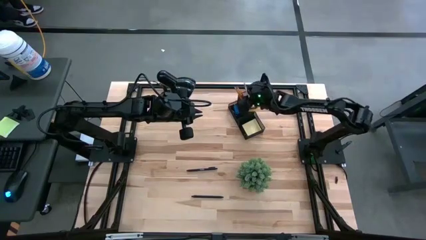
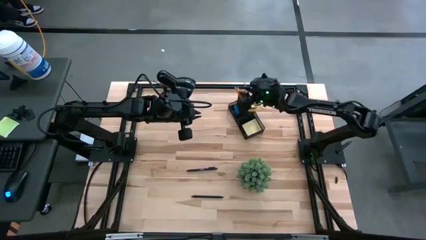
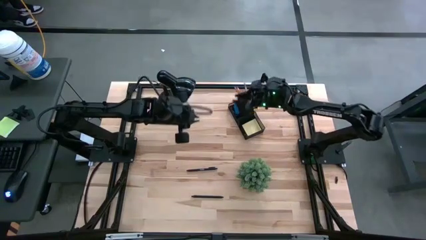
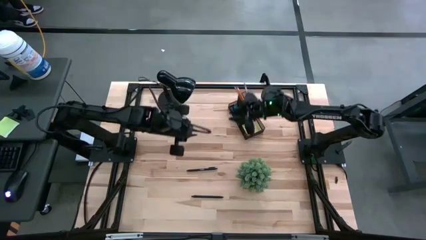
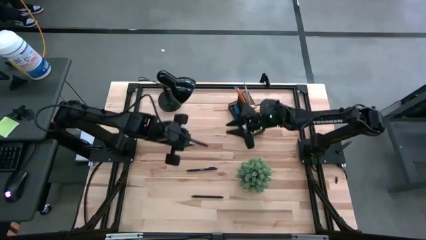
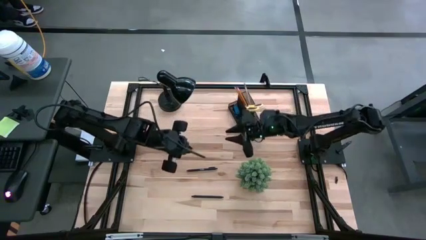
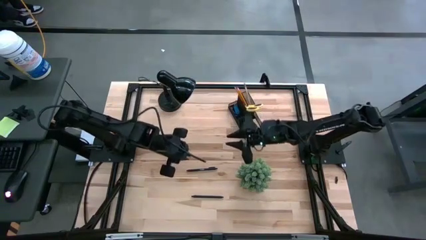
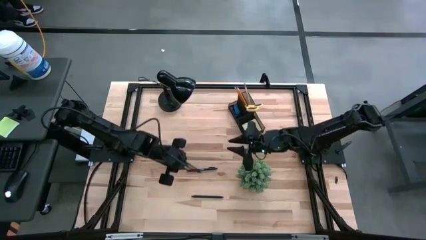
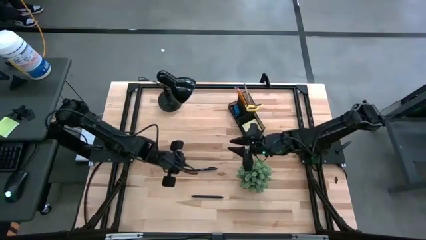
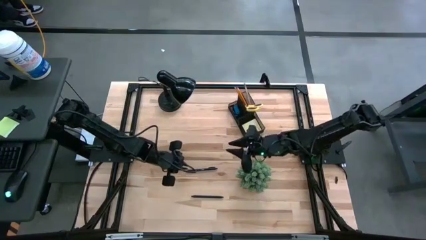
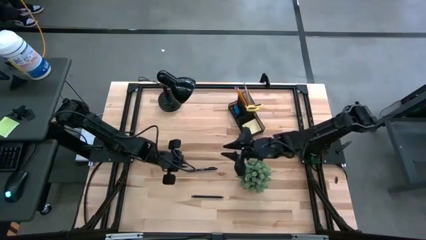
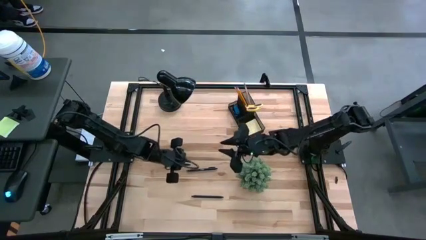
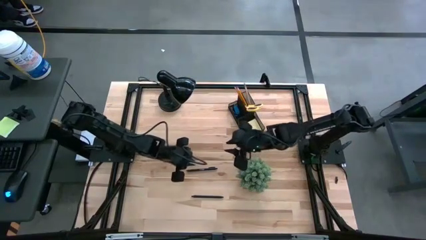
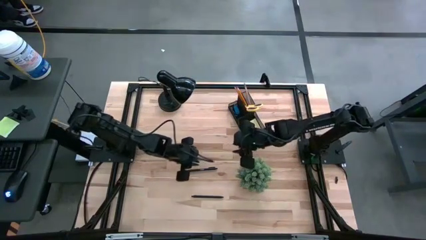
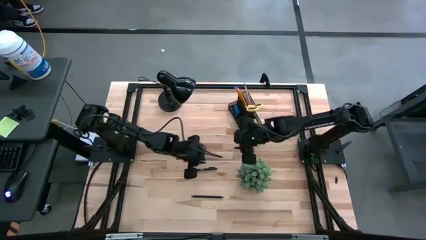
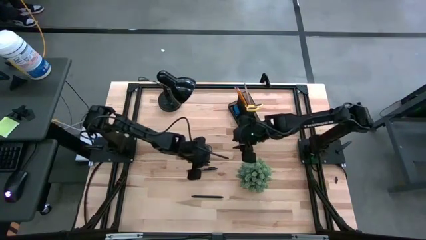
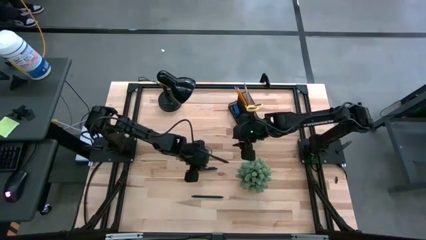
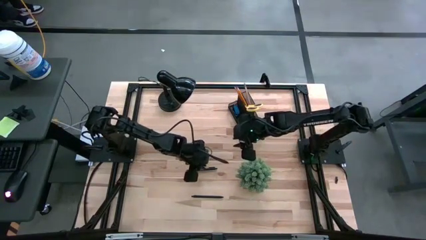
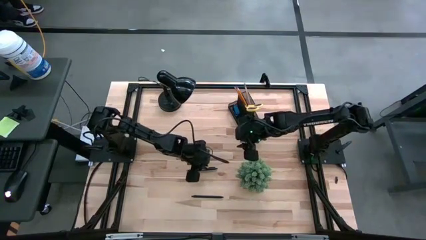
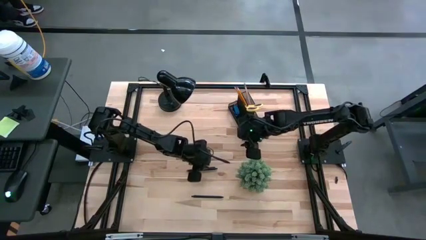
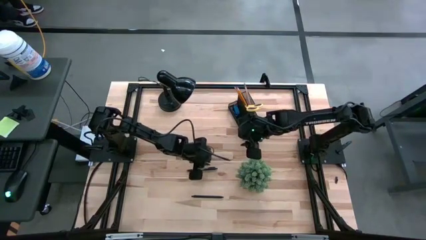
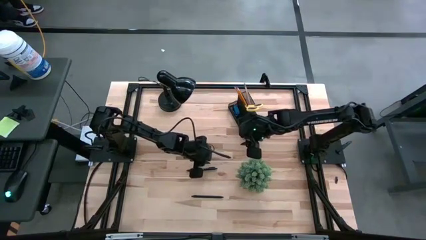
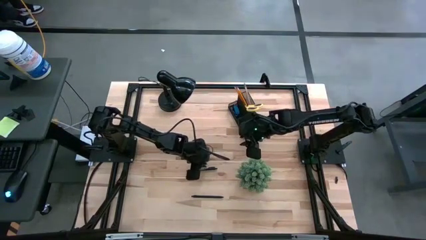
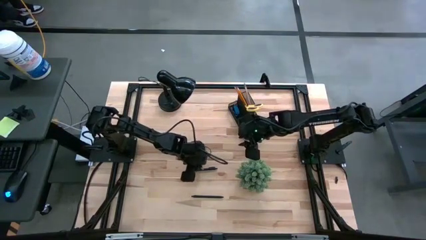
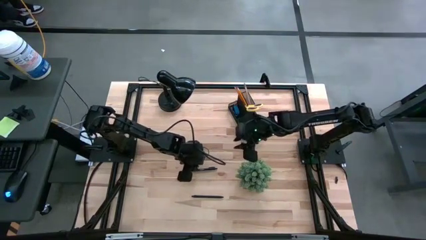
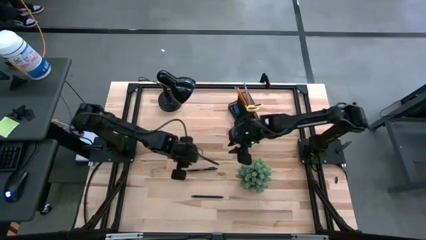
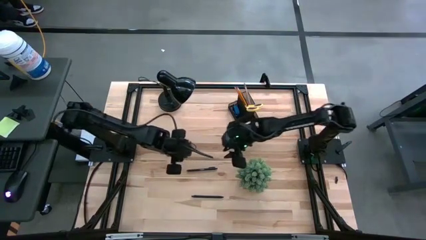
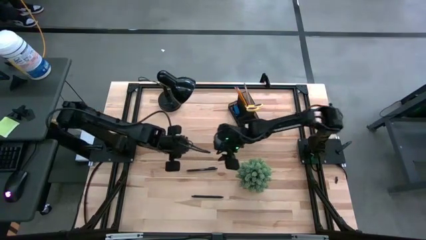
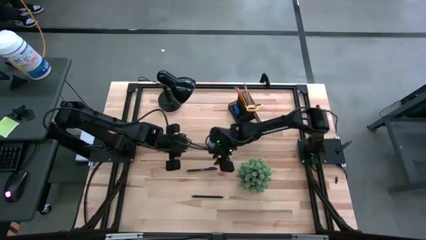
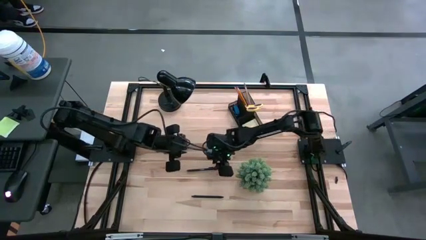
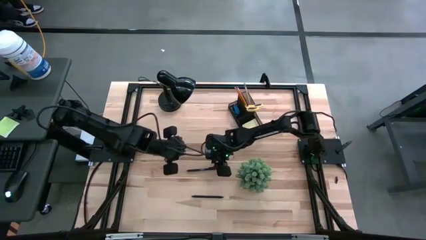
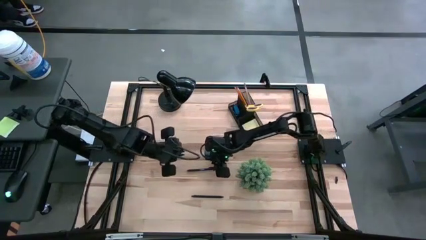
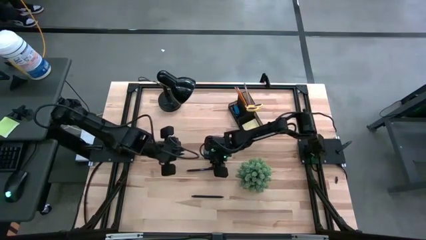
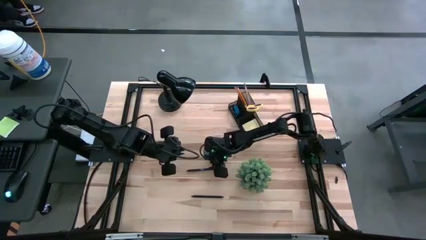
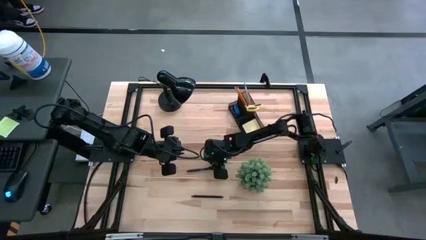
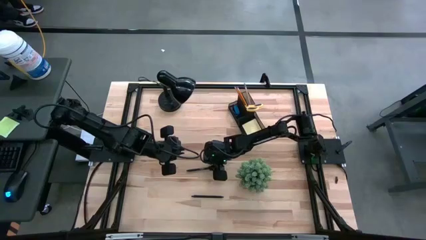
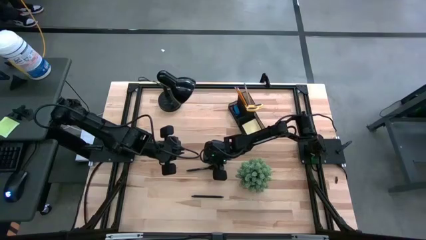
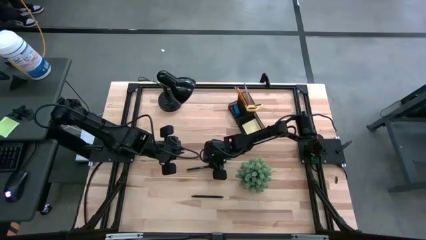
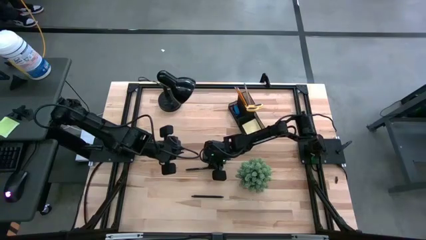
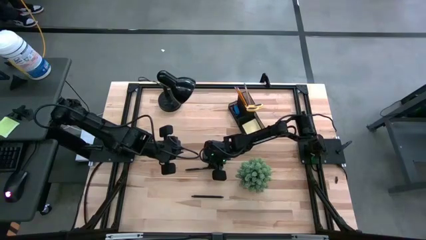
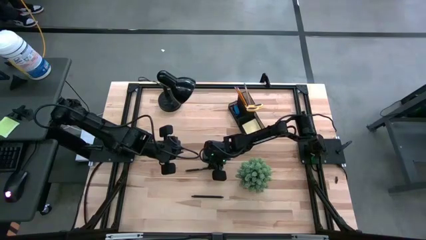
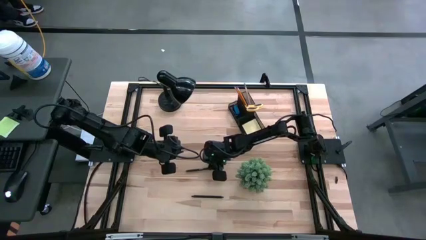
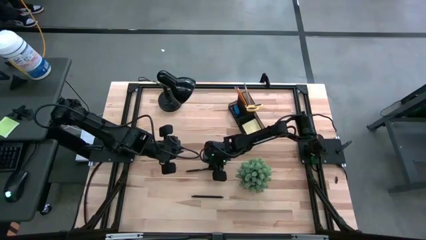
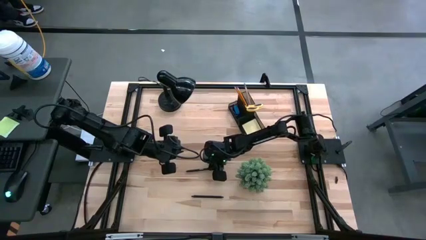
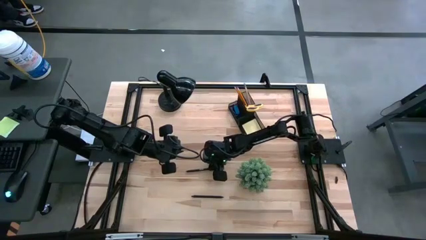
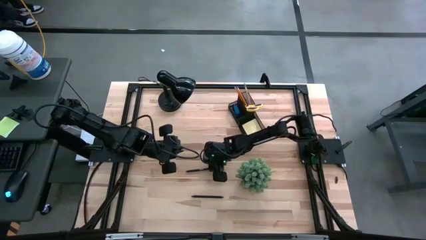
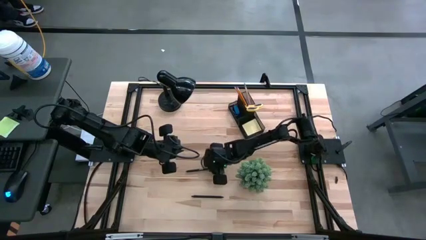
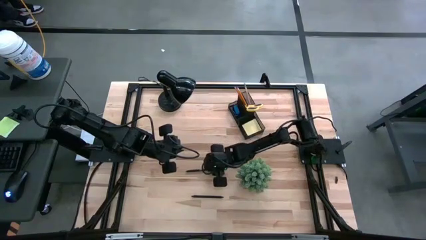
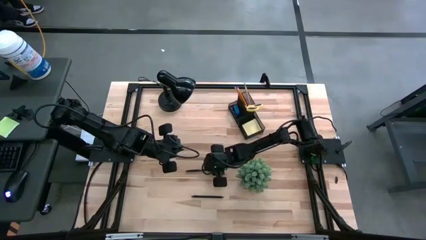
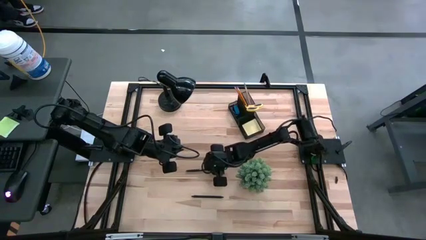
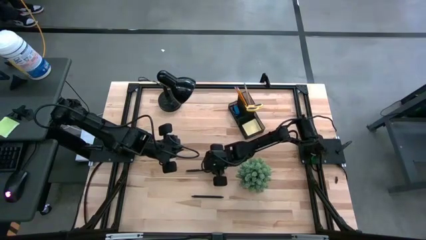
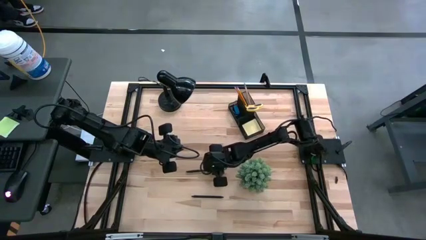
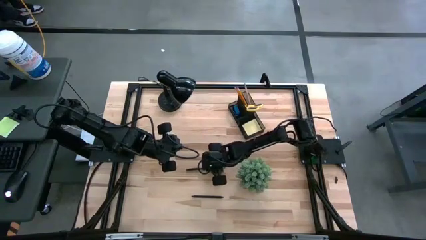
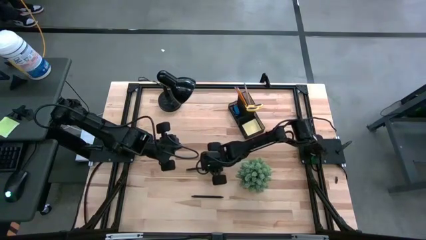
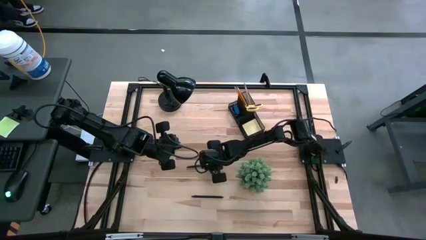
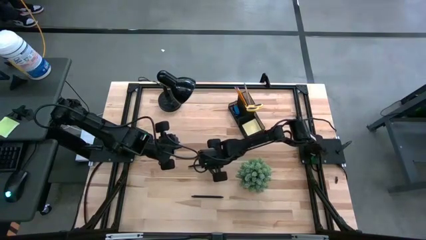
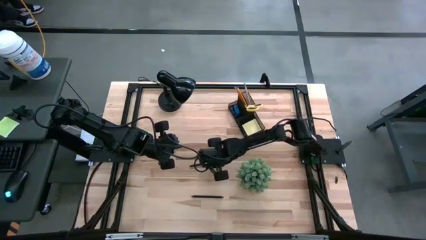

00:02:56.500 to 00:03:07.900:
Task: Pick and place office supplies into organizer
Put the top black pen into the desk organizer

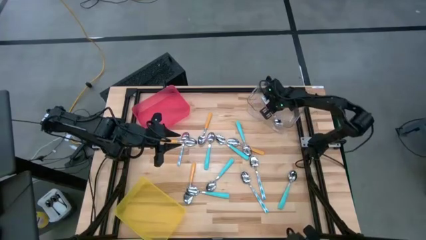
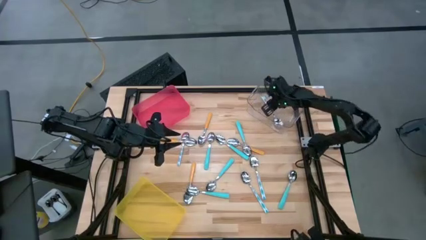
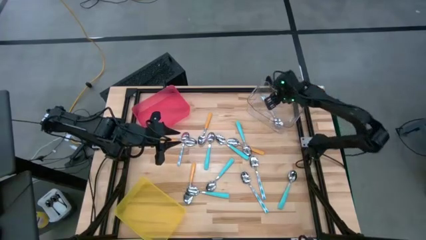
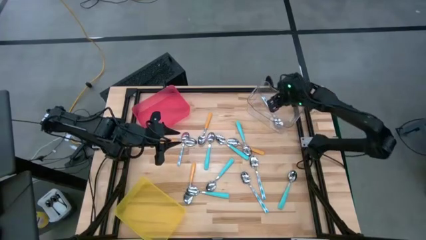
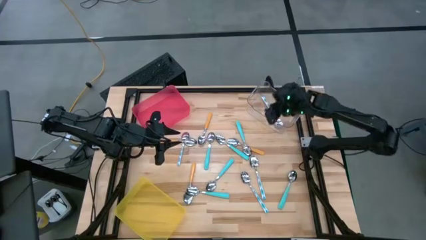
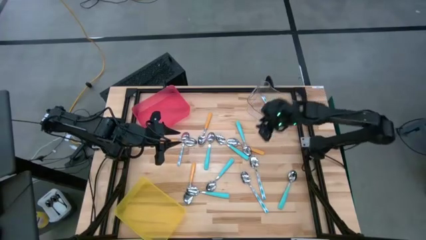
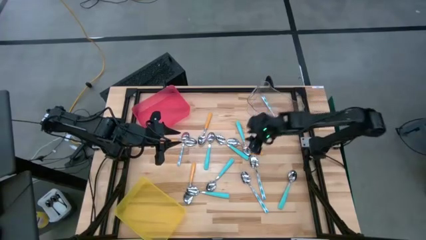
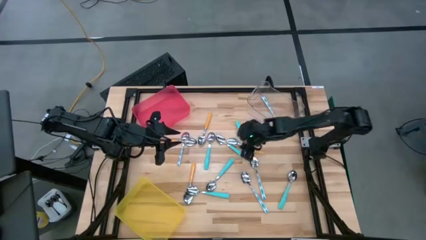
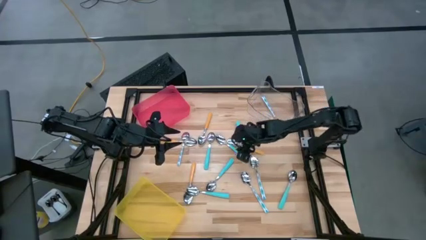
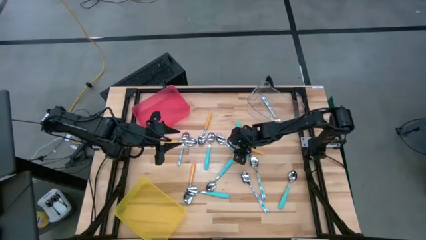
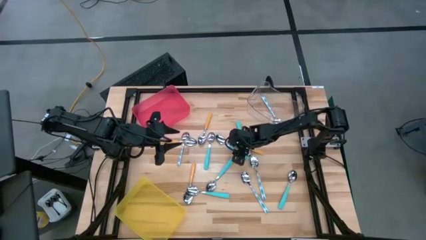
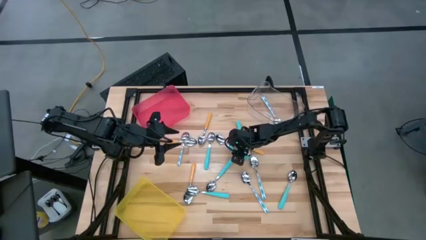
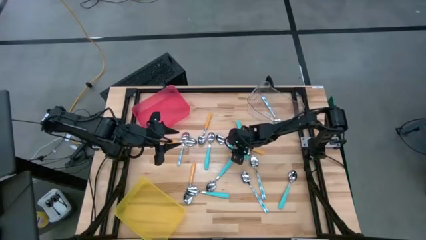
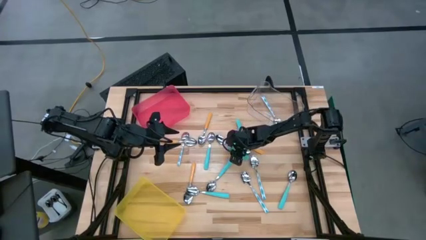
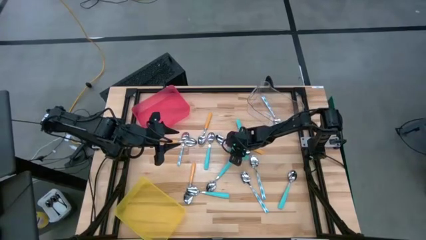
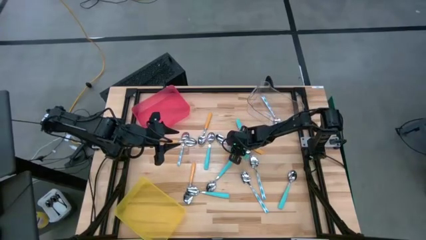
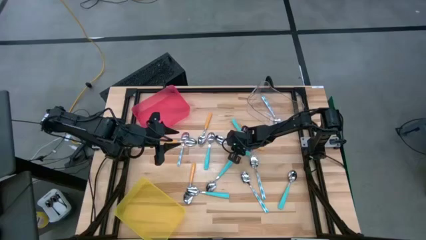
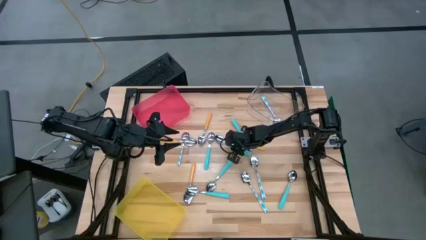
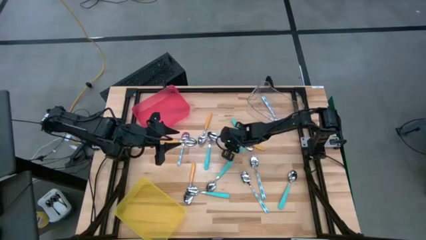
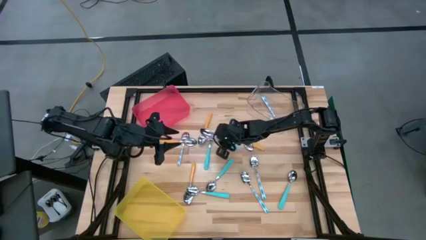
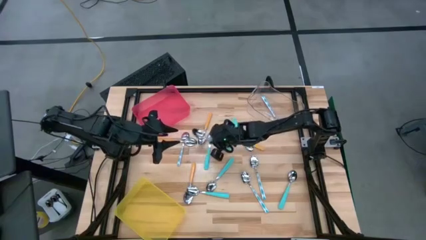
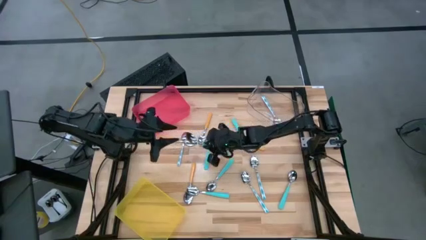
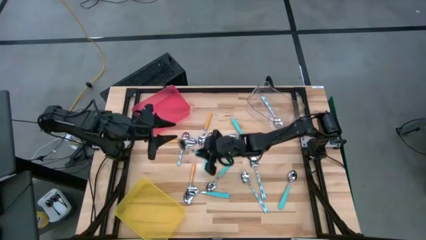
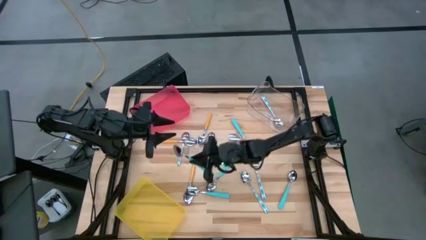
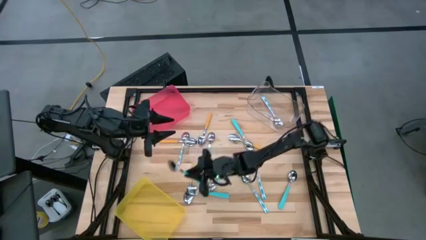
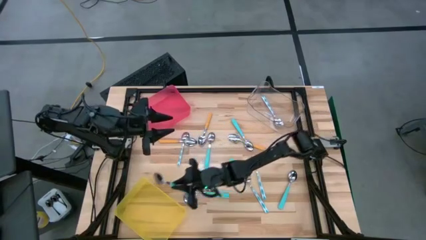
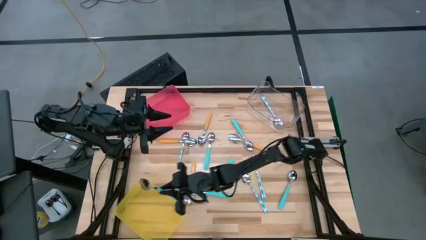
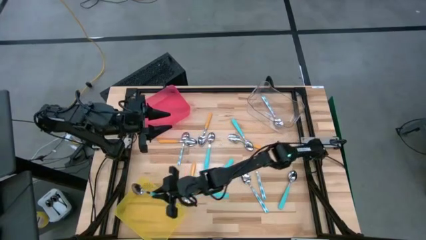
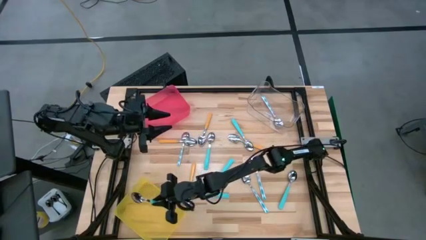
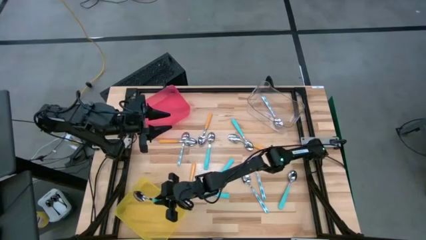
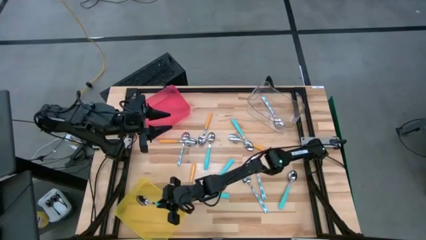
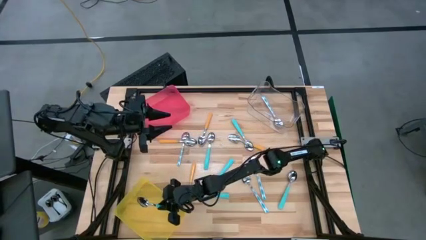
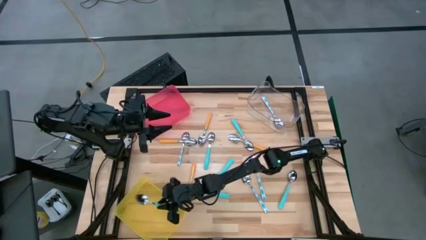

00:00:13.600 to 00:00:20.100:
Task: Sort silverware by color (type)
Put the light blue spoon into the yellow bin
